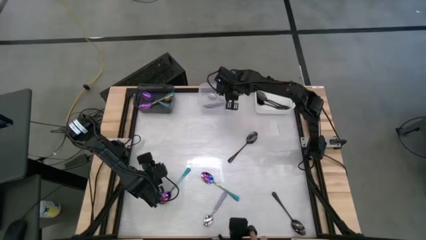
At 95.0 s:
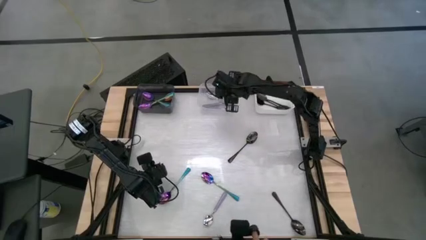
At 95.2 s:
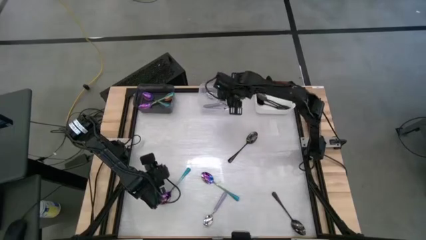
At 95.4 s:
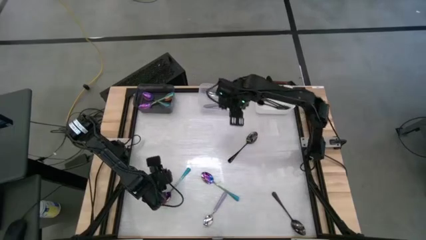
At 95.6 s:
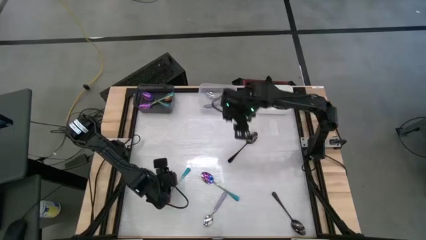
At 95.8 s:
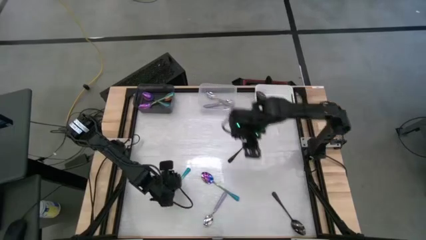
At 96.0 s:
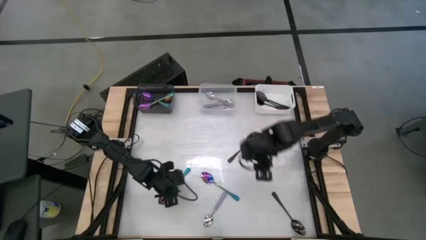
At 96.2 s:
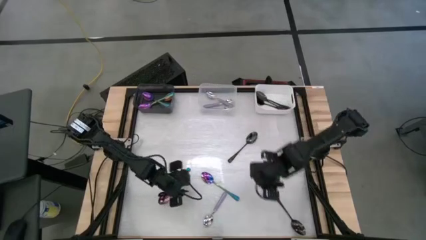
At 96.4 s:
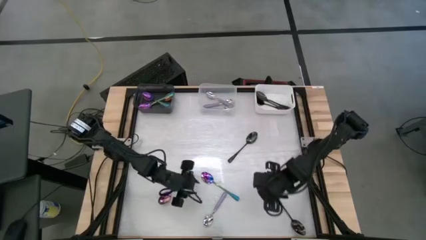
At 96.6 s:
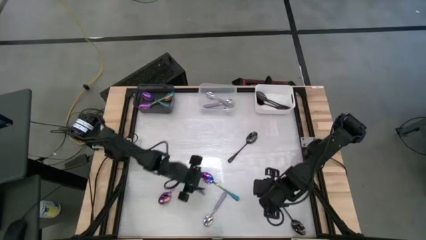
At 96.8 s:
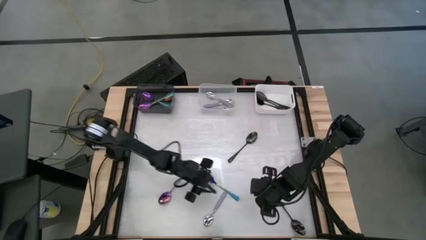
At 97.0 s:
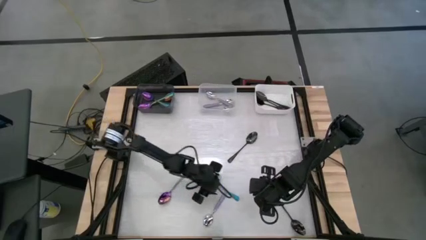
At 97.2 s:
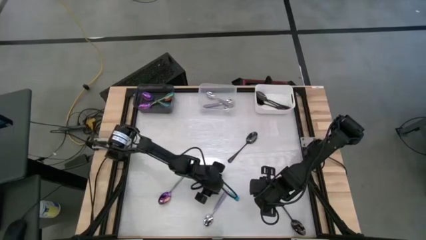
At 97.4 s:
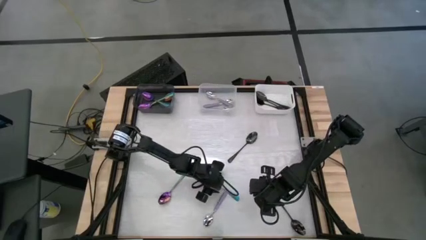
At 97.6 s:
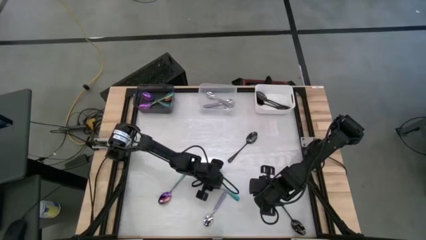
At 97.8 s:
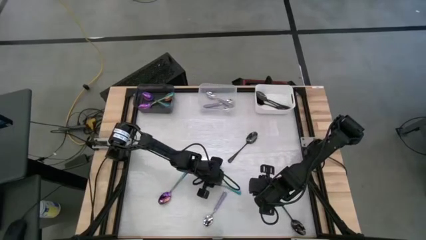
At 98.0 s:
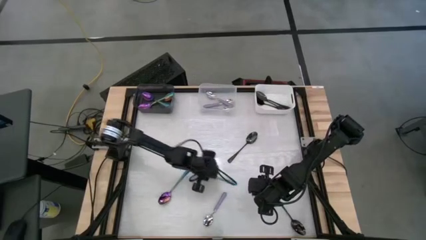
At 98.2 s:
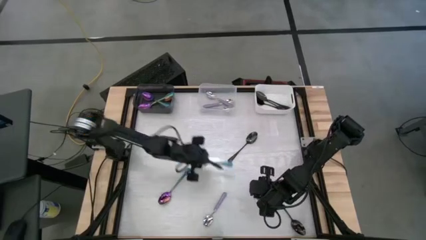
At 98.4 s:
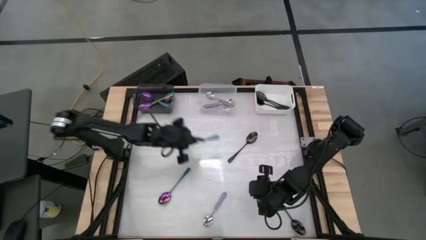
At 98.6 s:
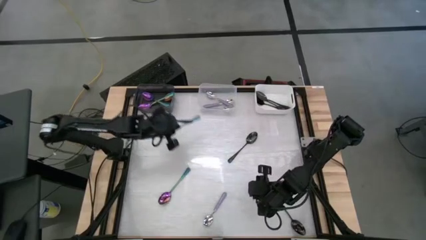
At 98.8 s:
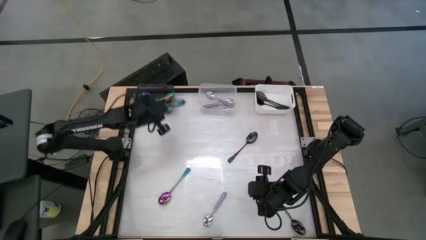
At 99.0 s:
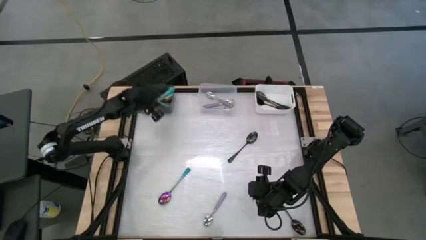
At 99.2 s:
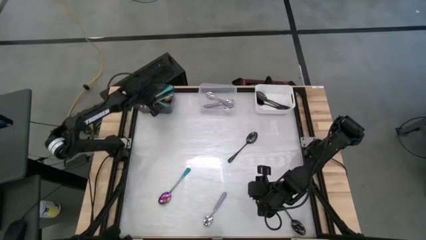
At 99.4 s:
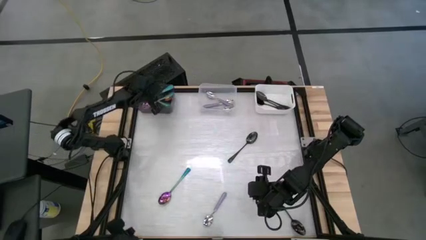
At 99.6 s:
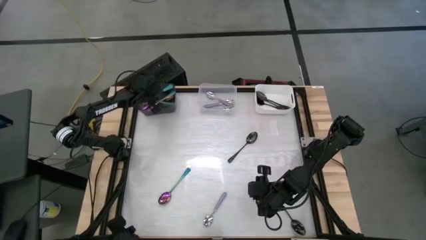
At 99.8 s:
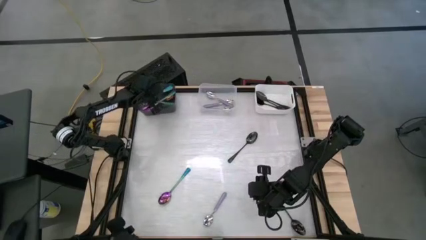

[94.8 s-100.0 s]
Task: Sort silverware by color (type)
Put the blue spoon into the black bin

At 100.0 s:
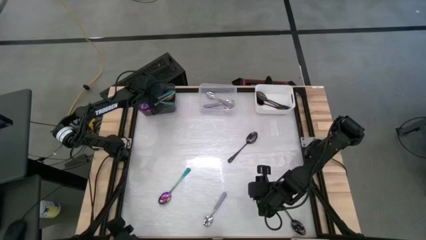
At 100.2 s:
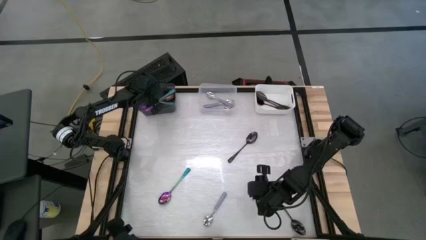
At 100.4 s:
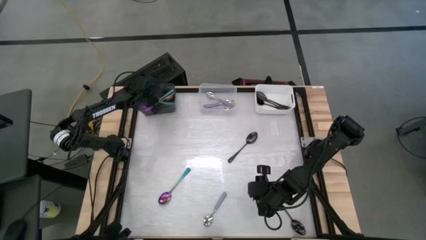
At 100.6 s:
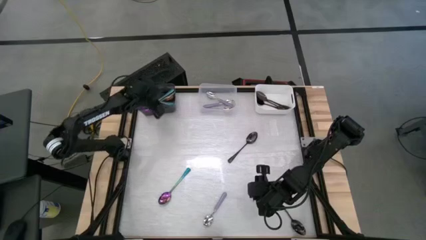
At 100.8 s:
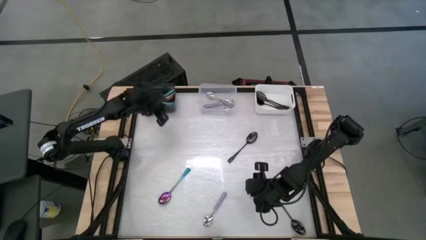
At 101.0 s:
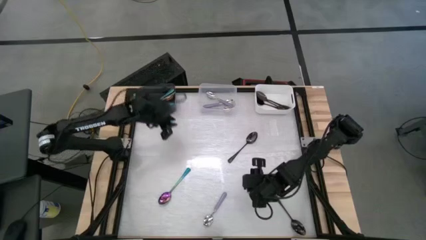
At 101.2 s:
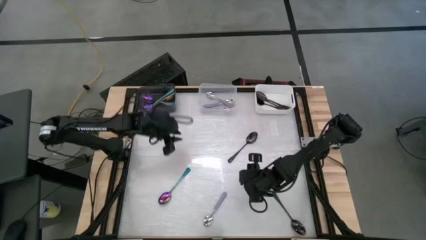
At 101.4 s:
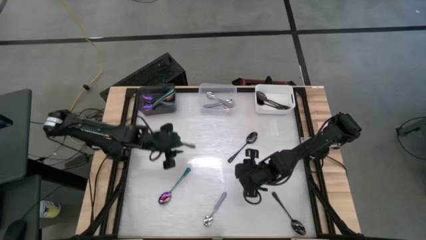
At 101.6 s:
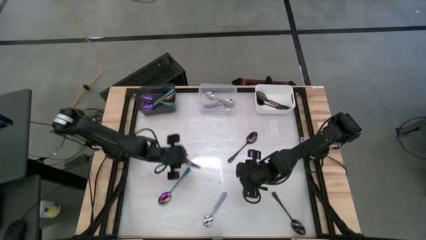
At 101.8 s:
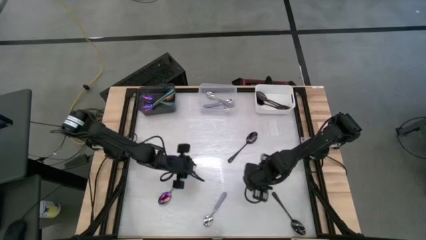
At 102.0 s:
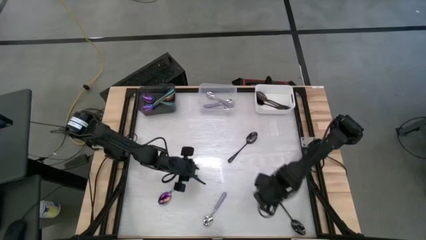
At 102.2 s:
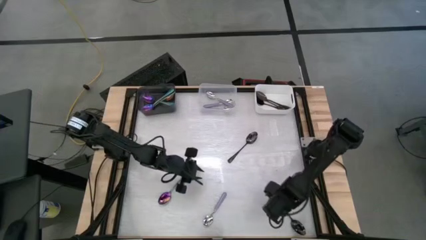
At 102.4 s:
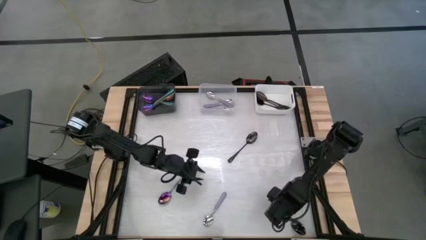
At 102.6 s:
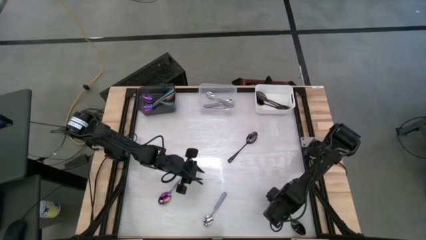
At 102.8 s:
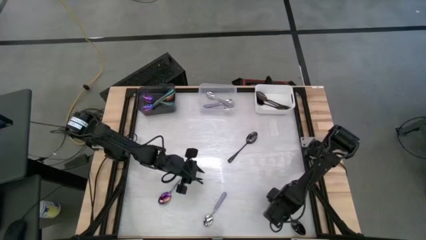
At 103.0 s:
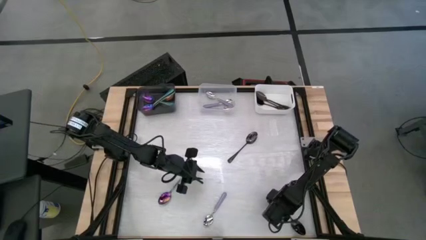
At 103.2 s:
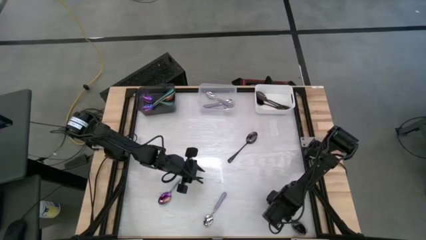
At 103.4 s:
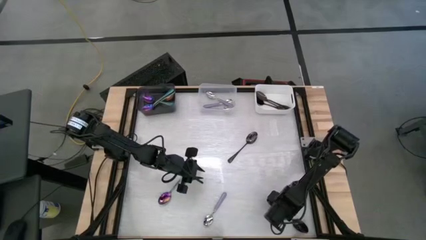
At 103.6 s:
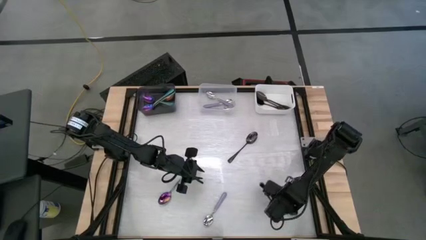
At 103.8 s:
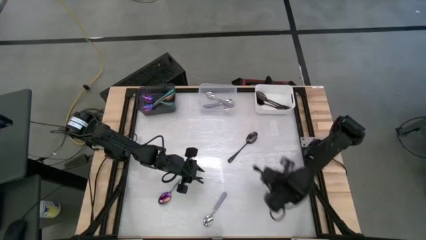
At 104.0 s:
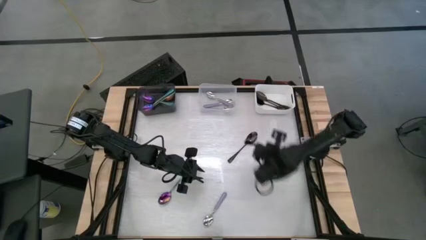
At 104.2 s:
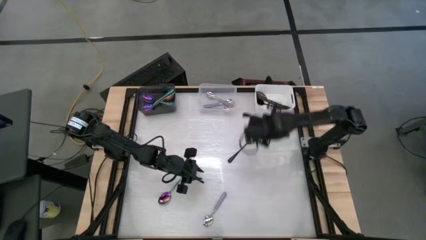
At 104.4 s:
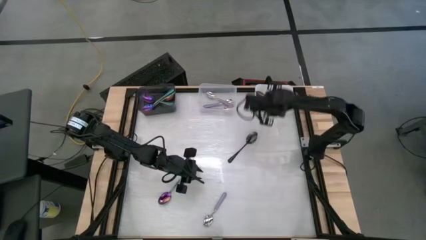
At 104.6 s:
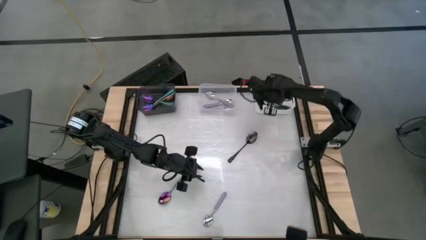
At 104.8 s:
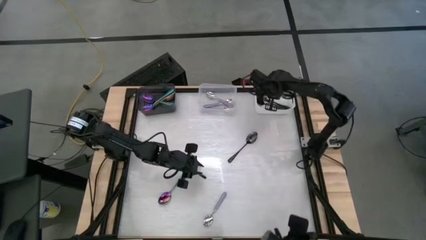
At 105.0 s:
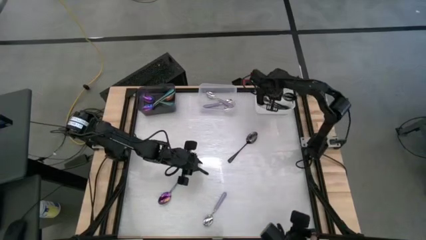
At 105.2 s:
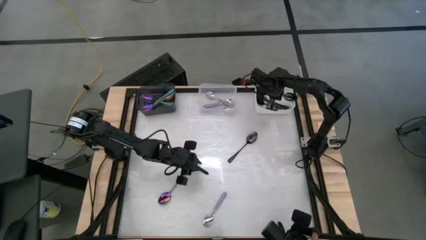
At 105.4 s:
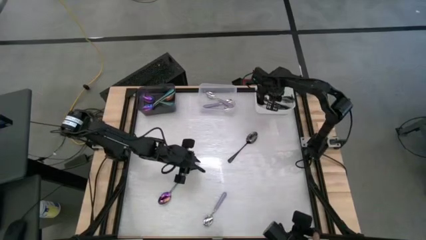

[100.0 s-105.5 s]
Put the black spoon into the white bin

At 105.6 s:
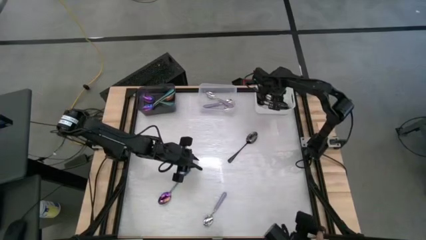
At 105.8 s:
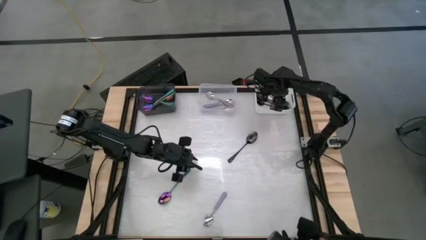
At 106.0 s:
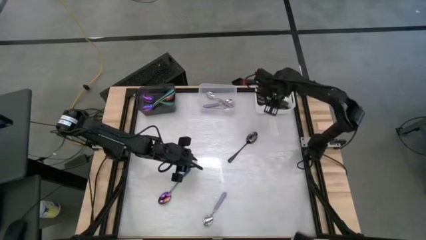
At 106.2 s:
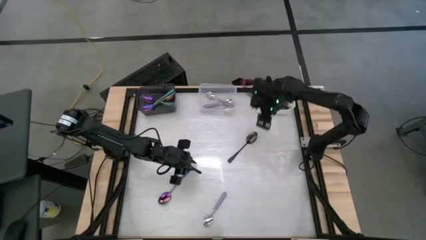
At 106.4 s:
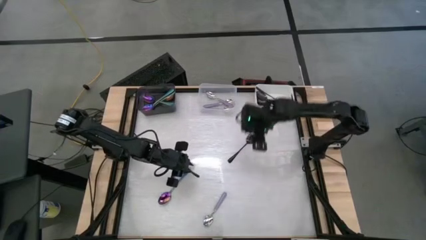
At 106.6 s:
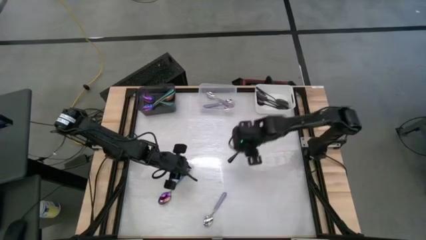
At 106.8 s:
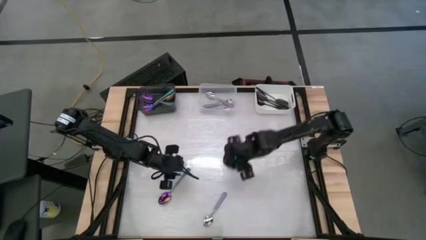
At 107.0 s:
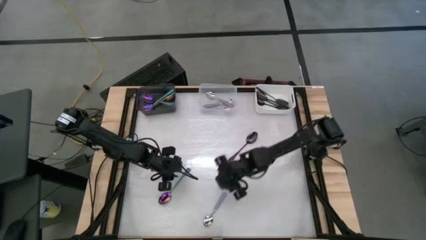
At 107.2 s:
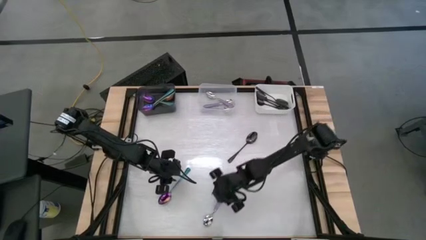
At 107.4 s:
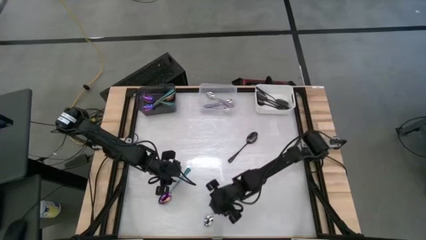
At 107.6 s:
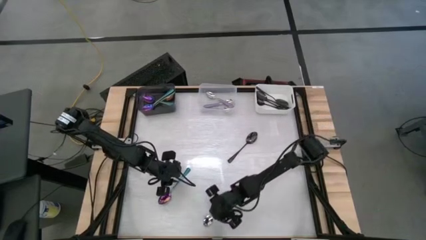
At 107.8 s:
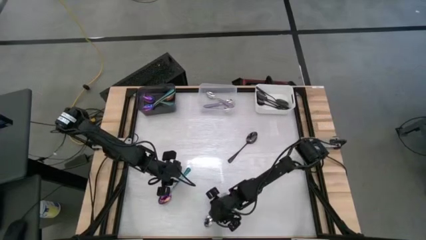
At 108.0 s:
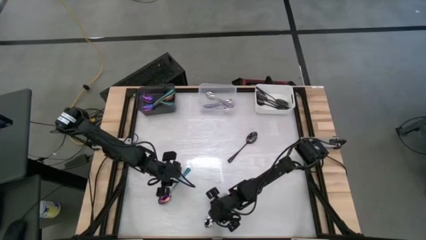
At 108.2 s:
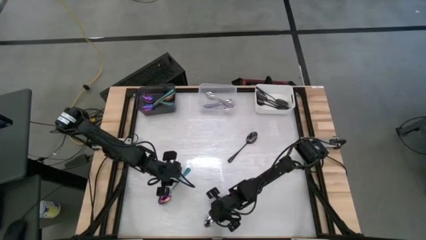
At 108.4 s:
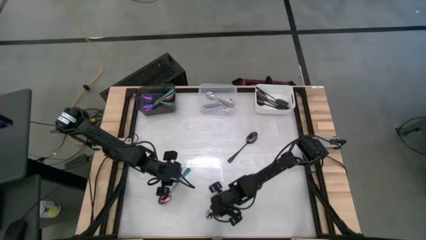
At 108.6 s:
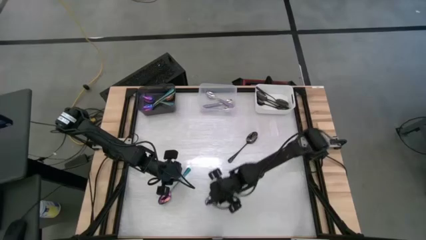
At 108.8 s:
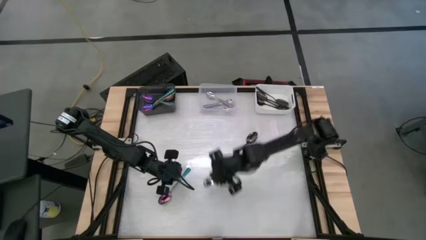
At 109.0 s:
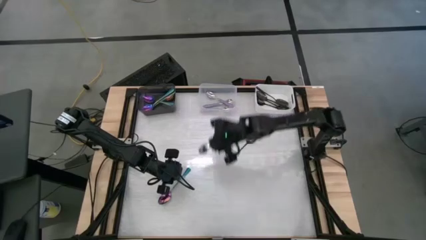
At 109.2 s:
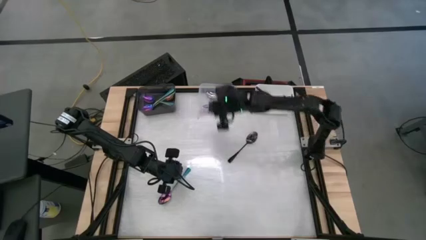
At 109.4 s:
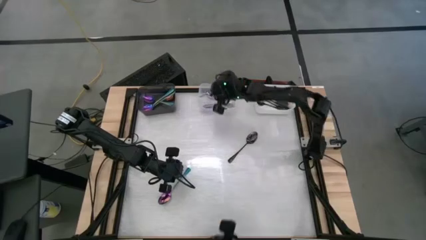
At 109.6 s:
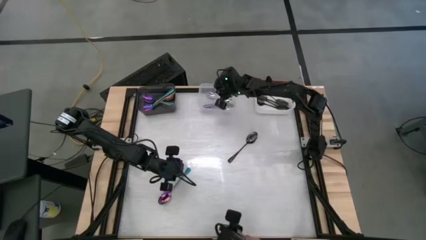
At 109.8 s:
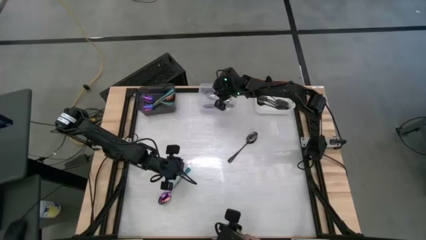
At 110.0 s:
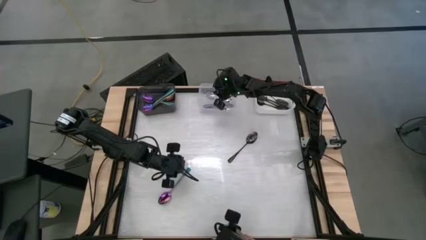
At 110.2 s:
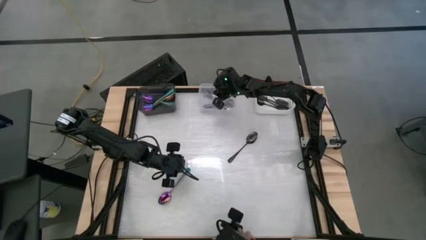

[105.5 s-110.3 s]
Put the purple spoon into the transparent bin

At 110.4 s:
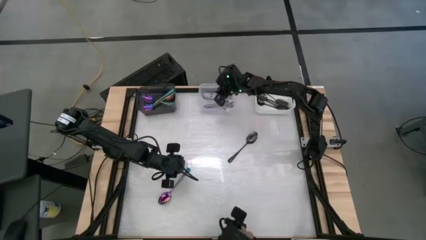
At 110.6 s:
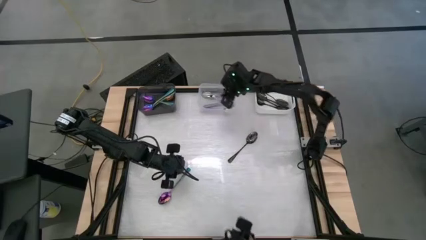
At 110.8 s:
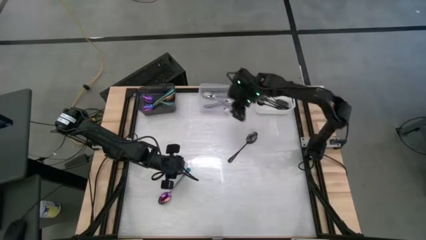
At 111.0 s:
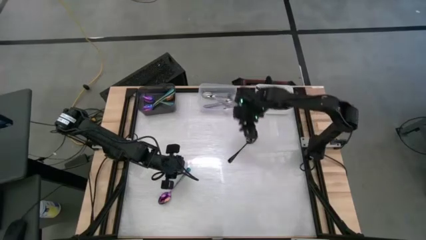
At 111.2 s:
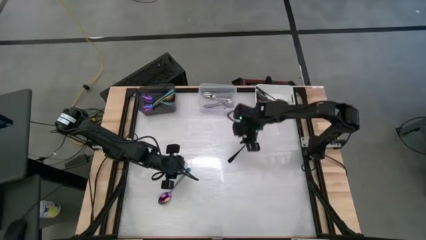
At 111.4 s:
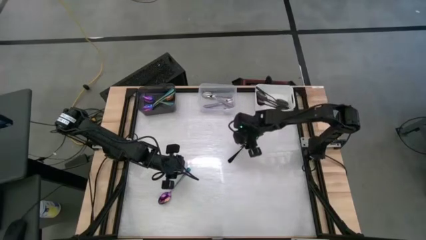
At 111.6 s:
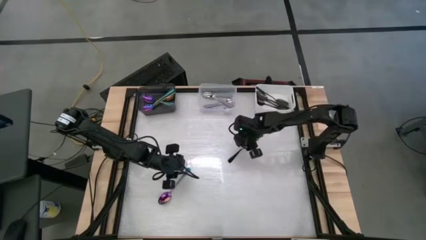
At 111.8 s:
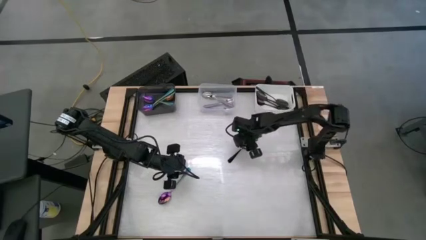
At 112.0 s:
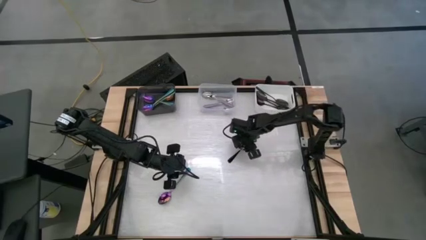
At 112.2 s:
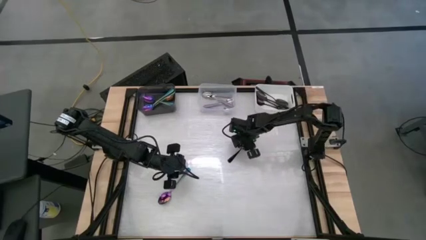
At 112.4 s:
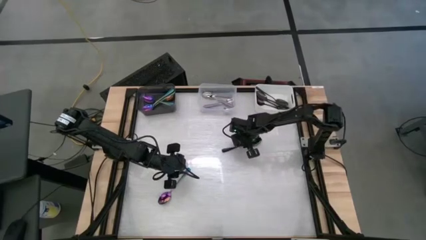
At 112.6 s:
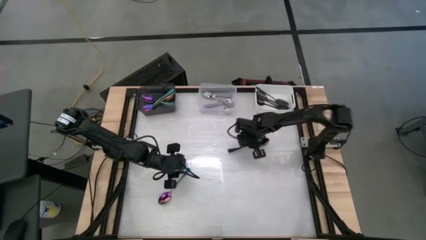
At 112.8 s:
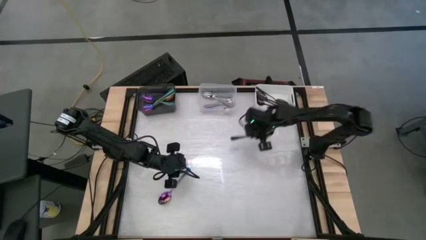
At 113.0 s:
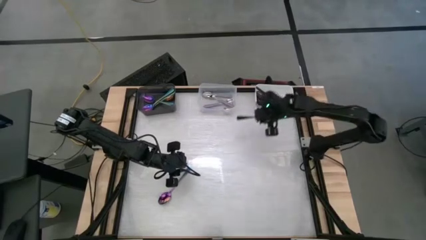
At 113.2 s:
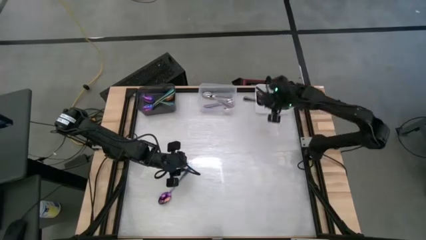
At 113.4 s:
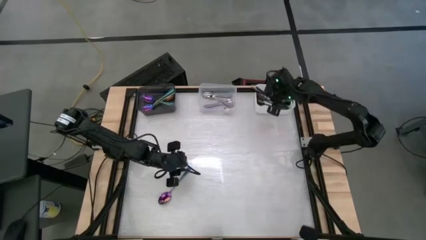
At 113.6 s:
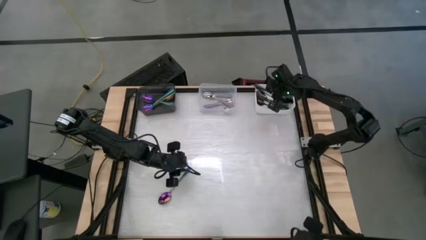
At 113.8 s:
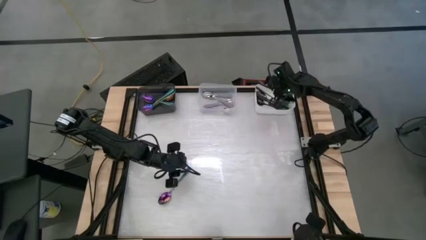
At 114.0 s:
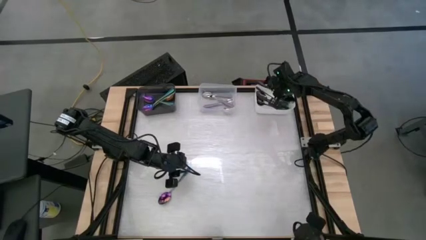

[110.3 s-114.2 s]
Put the black spoon into the white bin
